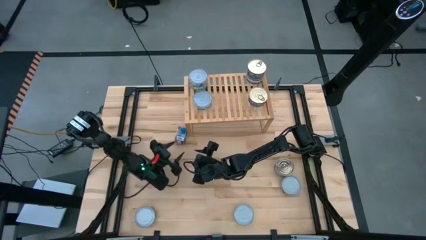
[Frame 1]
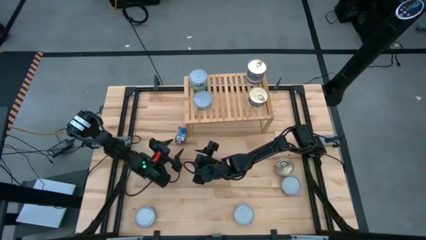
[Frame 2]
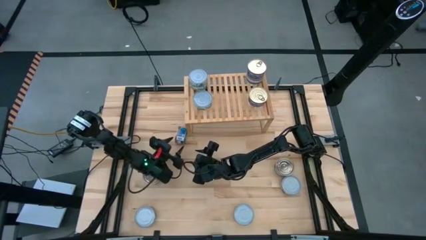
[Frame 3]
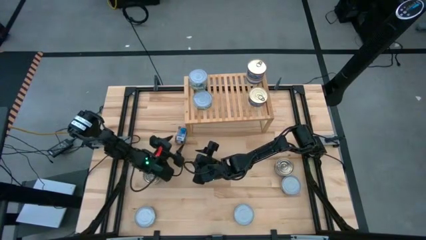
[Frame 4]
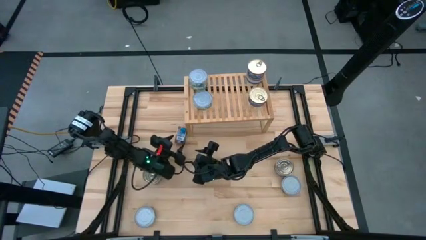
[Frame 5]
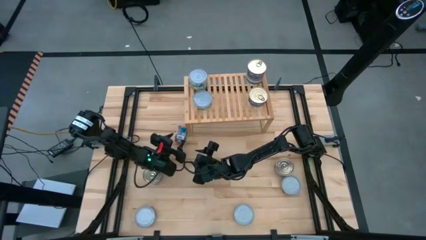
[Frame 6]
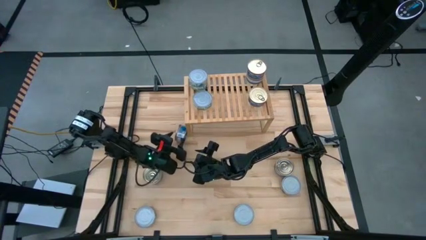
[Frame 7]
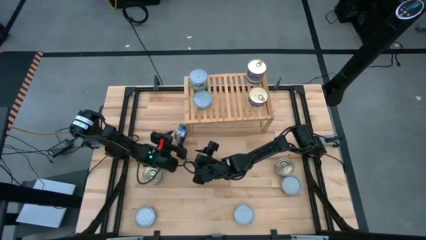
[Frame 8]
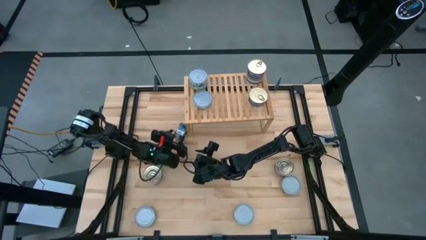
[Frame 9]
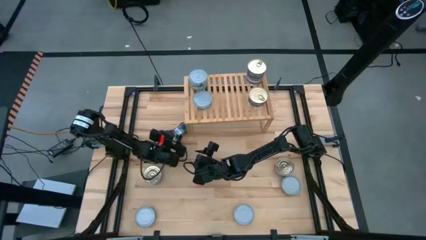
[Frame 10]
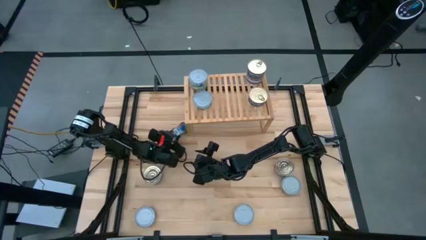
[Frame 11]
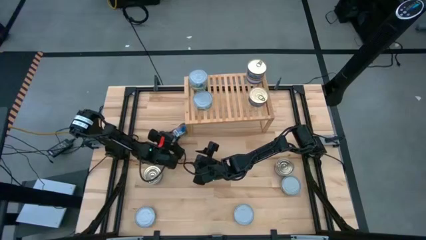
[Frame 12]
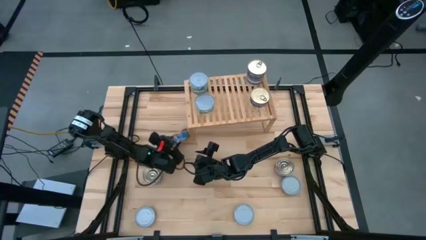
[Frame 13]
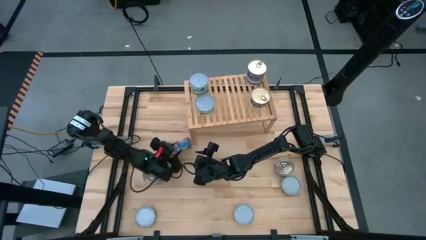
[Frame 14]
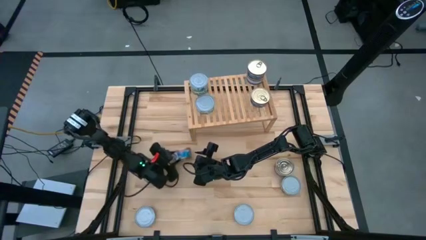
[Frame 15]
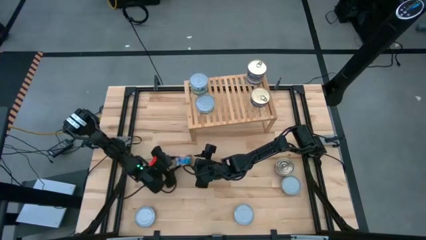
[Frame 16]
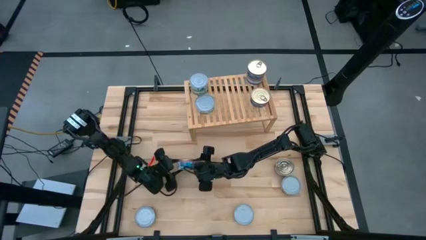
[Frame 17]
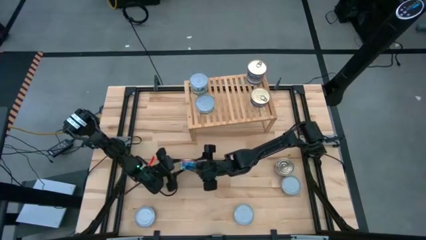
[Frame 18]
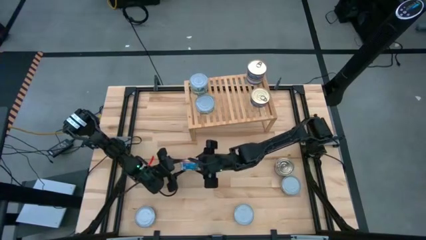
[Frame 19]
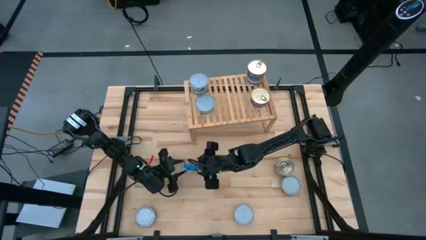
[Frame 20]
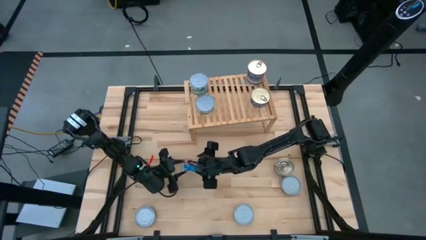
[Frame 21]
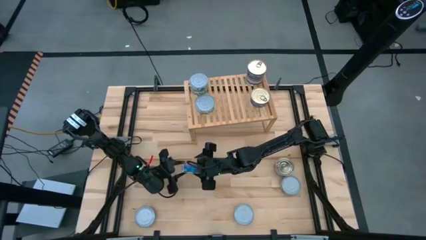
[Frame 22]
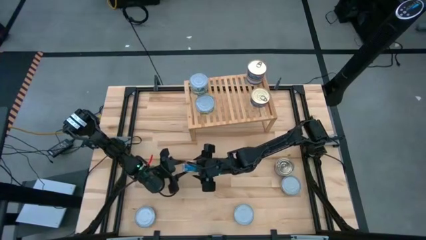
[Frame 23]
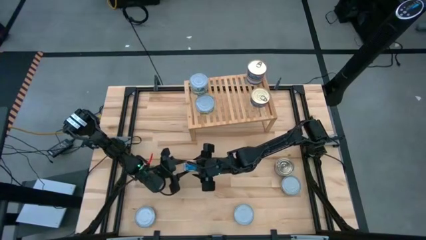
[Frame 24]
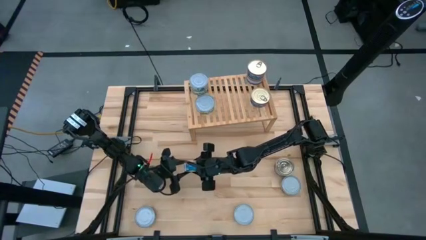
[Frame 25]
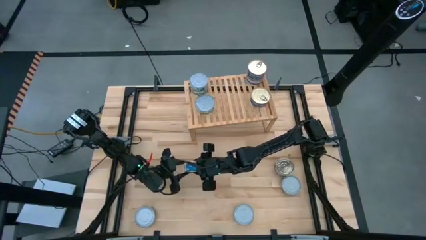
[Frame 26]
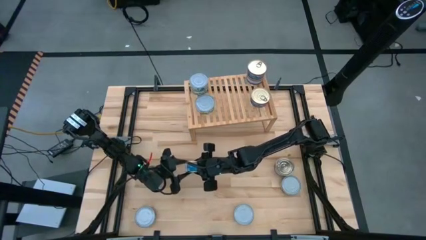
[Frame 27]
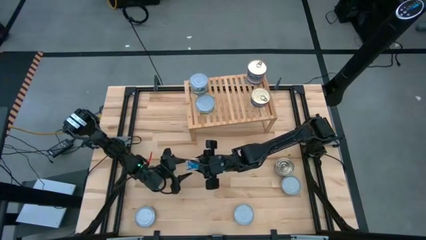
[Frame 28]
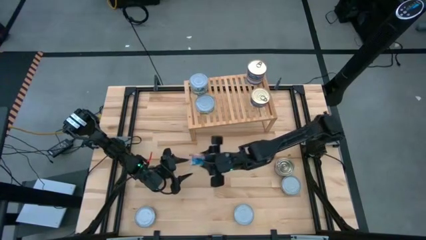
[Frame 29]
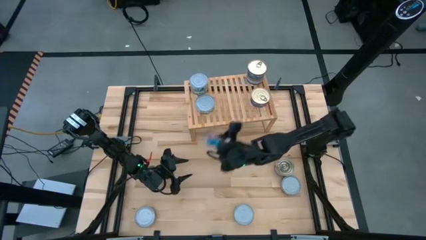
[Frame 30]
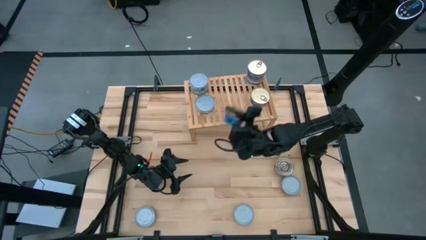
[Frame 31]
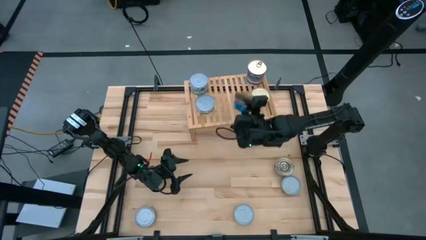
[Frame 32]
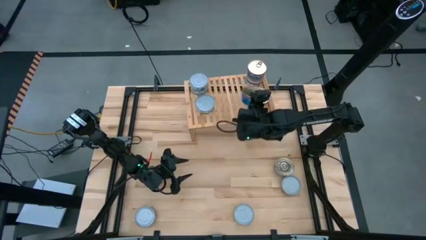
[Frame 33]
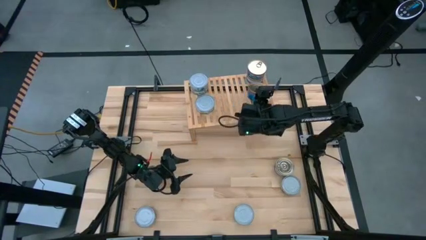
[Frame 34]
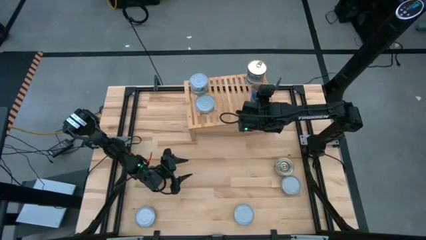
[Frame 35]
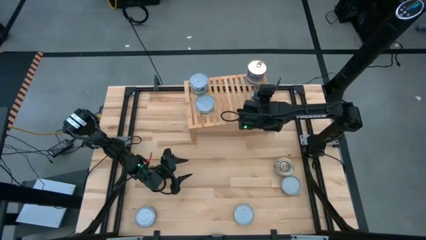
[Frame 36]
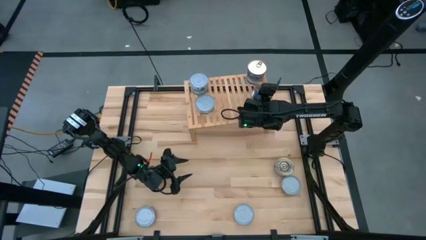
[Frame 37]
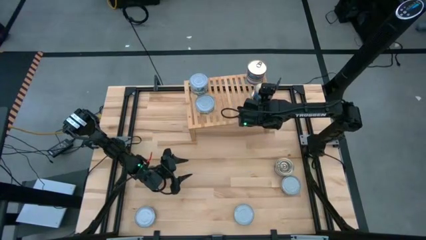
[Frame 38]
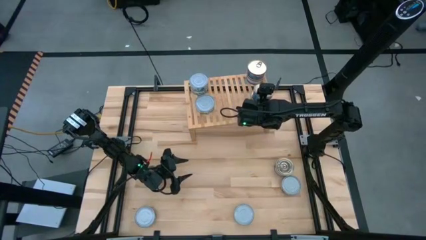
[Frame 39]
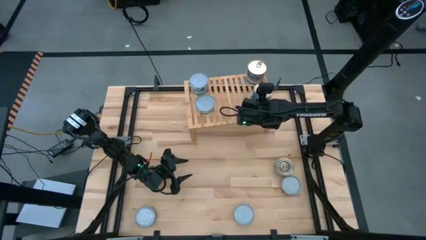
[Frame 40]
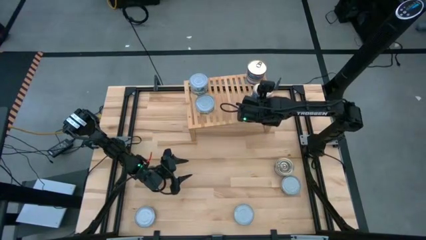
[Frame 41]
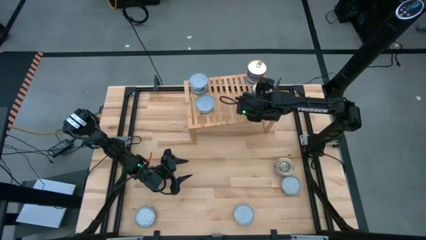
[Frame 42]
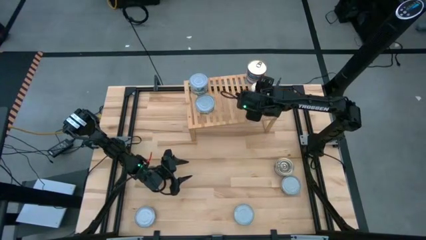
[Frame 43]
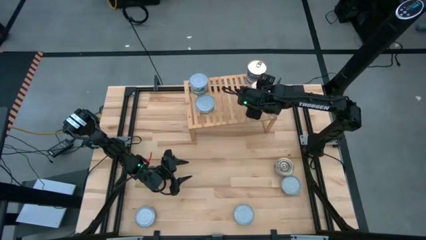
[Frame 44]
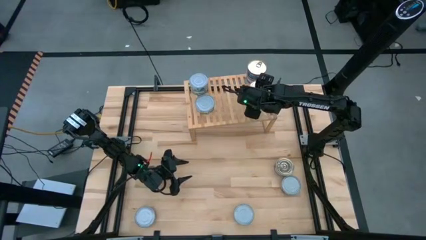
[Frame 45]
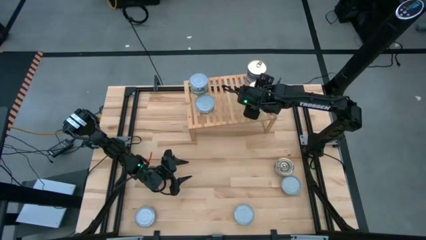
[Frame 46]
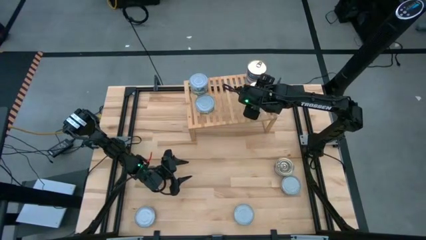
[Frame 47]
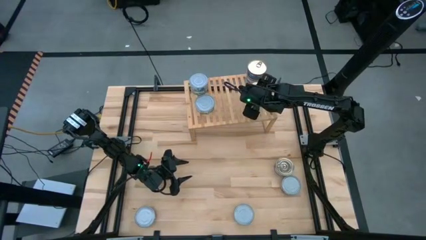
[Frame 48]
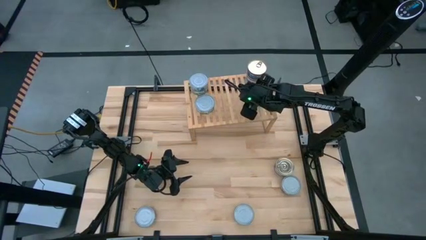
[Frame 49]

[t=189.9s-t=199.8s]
Task: Stack canned seafood by type on shelf
Stack the blue tuna can on top of the other blue tuna can on the shelf

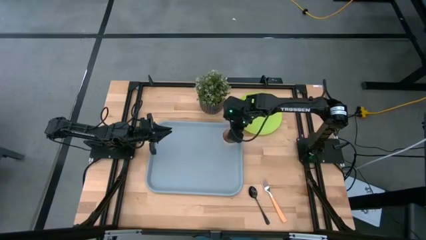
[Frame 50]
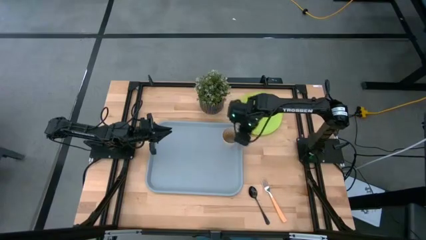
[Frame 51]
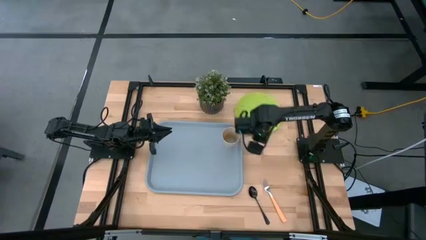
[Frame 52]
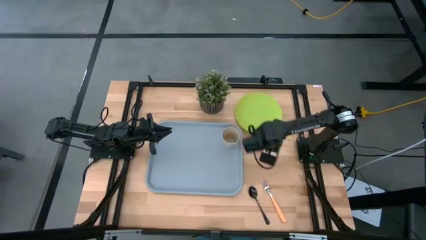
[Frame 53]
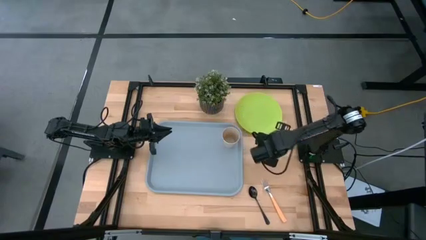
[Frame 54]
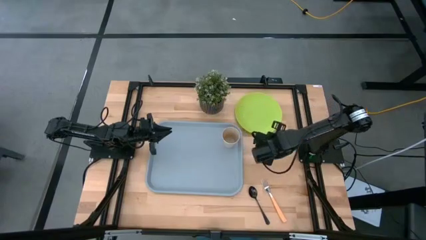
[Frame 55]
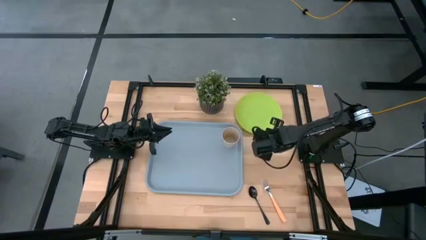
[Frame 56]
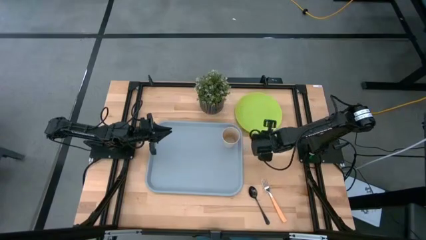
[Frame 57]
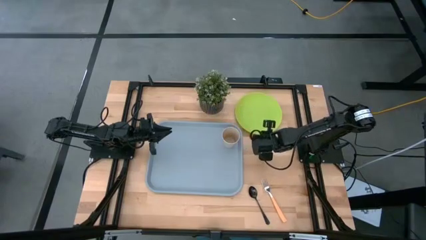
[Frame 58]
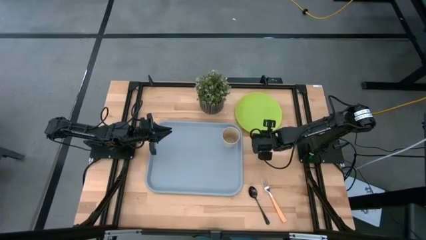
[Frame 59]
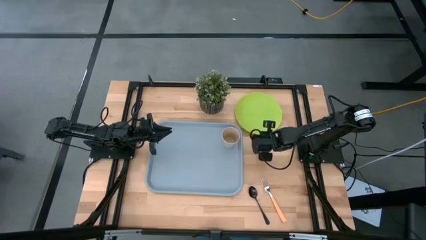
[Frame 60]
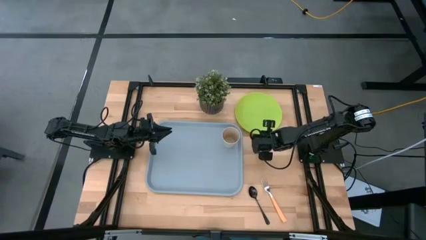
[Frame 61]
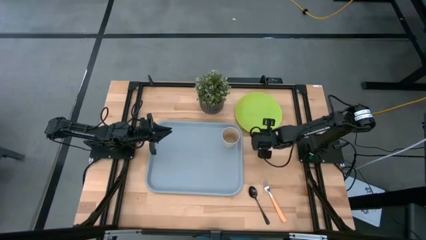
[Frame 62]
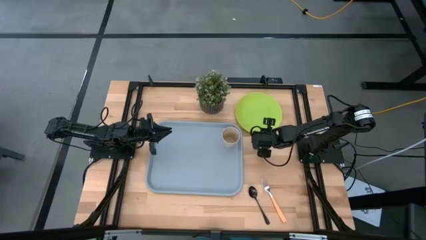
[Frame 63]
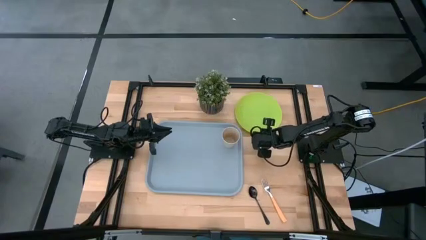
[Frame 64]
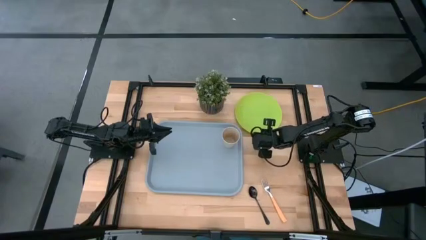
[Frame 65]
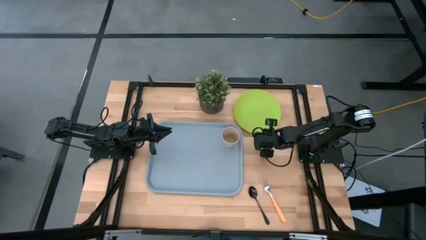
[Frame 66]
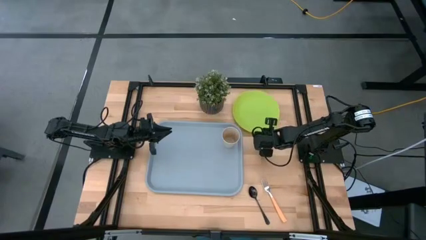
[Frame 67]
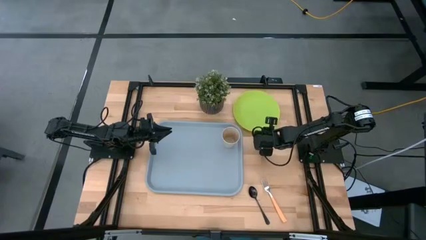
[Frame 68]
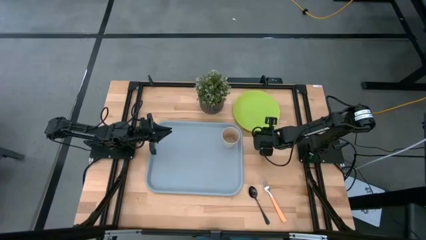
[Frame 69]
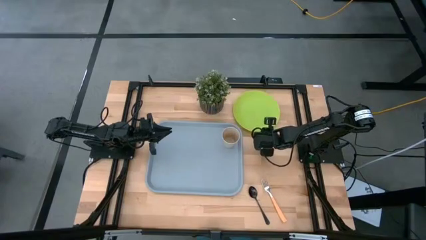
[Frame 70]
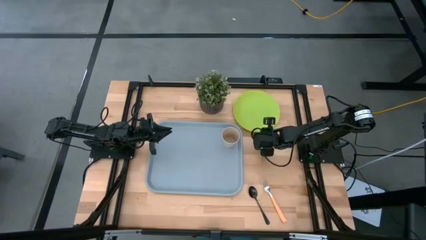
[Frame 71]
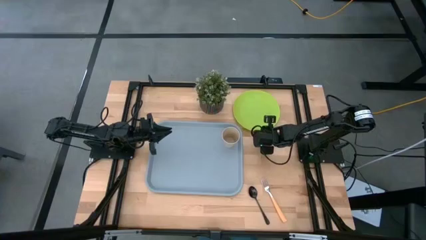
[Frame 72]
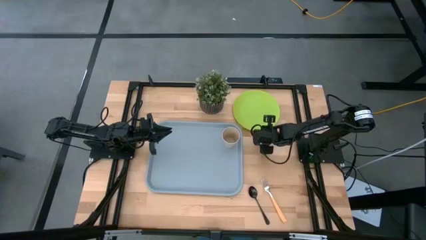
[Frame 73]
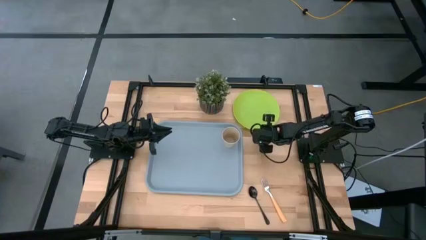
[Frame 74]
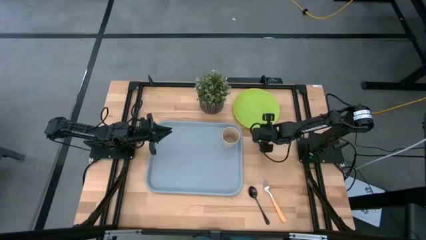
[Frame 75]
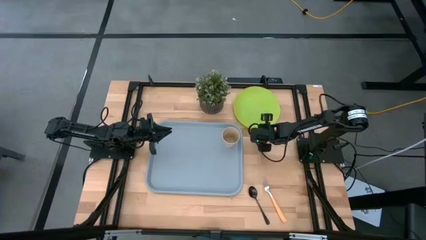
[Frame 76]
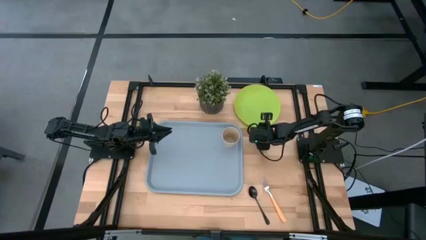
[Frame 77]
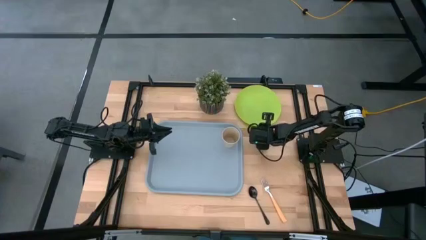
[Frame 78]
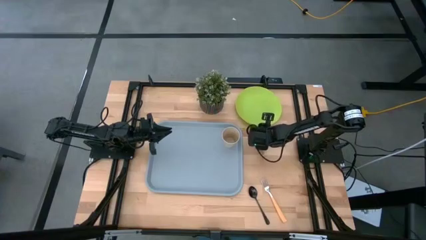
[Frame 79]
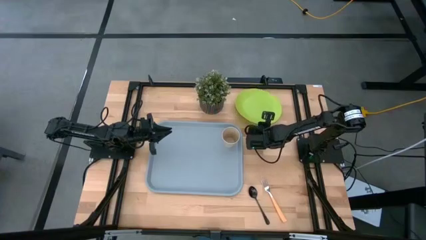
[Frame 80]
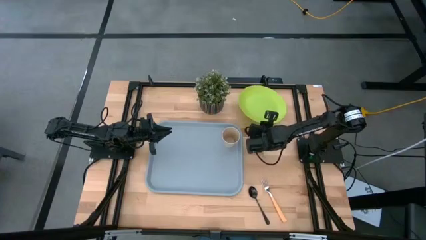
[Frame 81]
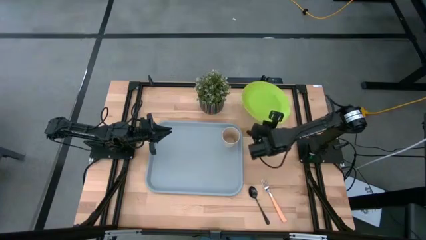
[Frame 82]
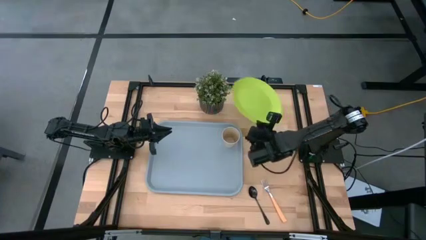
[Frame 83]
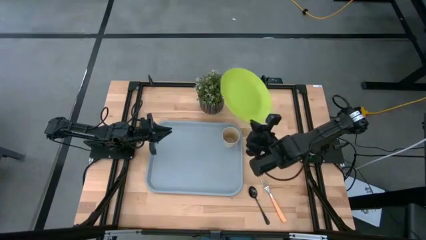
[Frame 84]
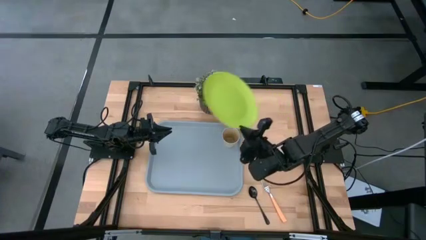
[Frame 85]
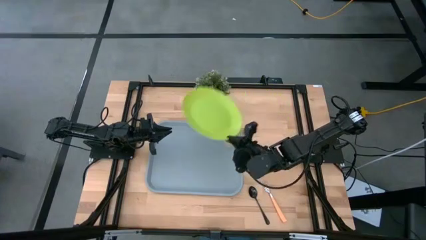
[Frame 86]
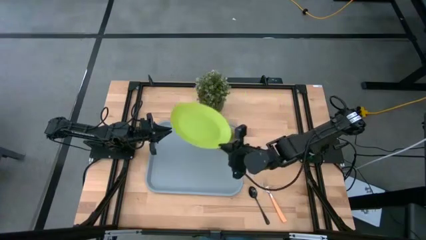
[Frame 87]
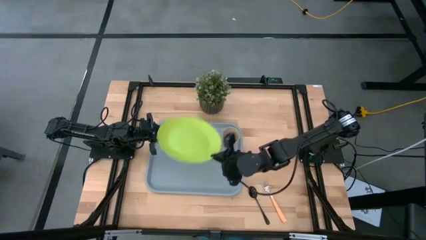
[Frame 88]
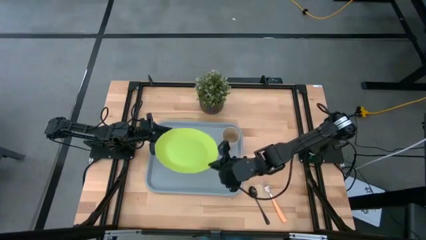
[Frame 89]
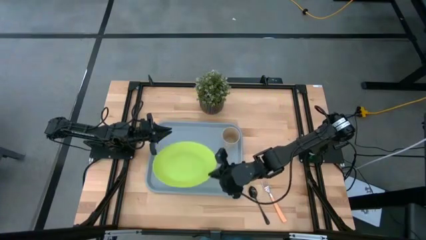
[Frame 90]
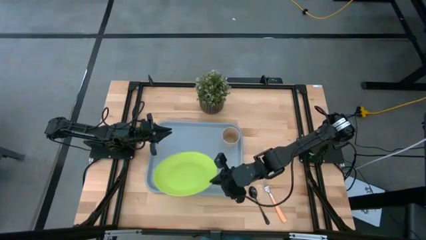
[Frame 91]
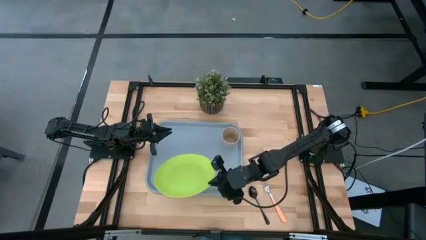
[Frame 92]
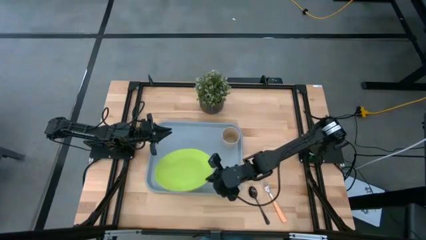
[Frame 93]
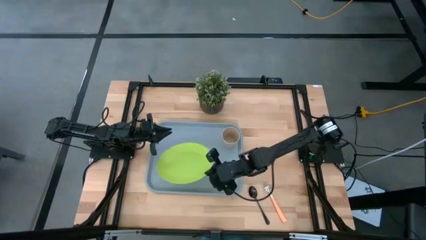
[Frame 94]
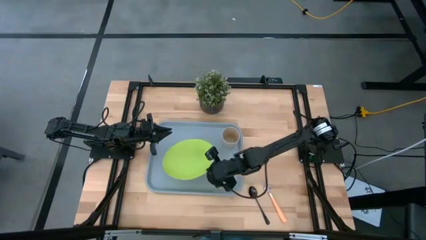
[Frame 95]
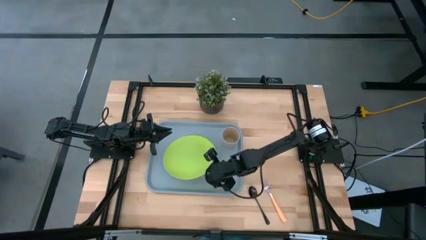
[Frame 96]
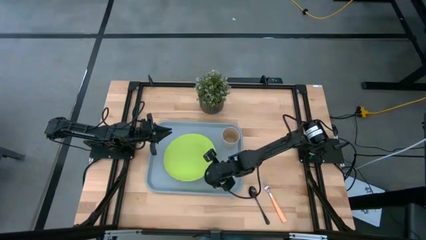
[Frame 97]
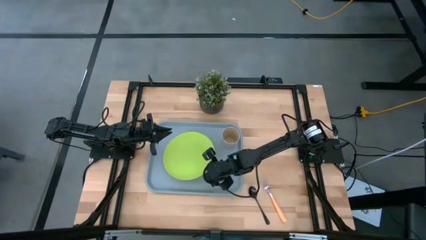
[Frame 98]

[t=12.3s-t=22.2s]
Task: Pick and place plate/cup/fork/spoon on tray
Put the green plate on the gray serving tray to the bottom left of the white cup
